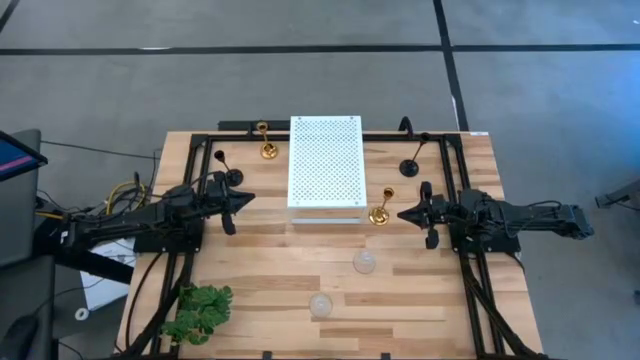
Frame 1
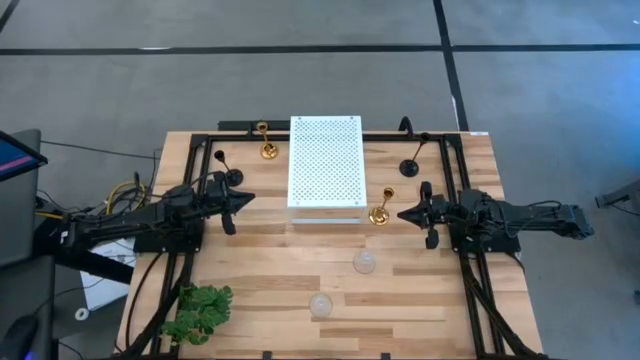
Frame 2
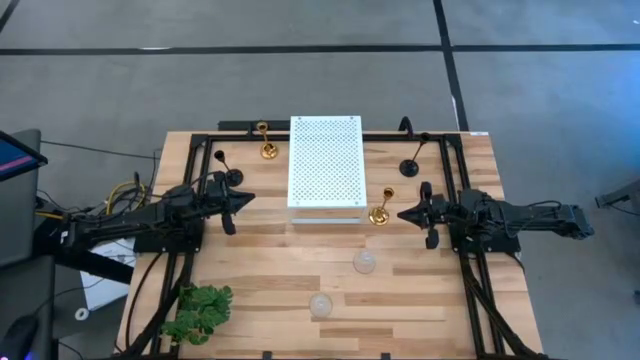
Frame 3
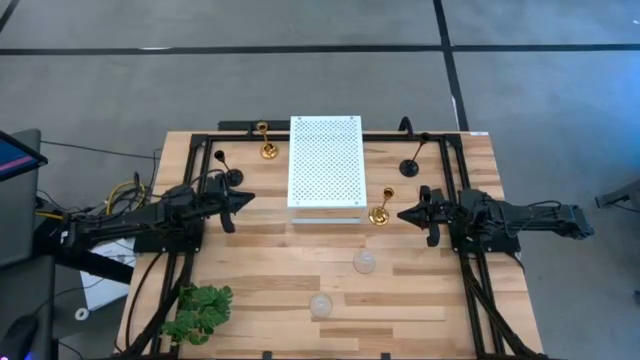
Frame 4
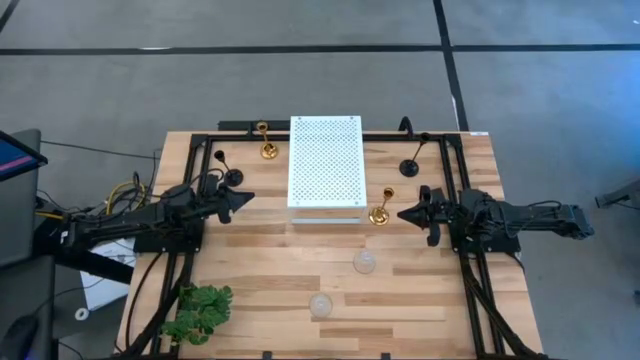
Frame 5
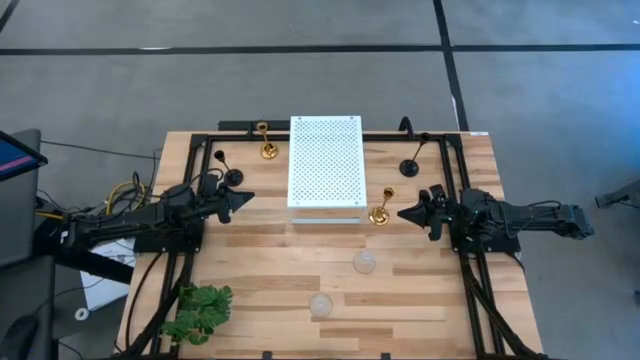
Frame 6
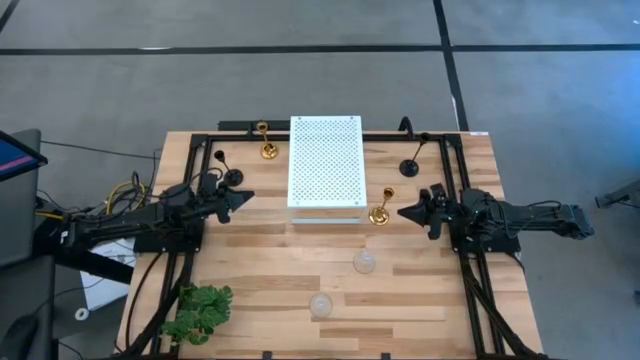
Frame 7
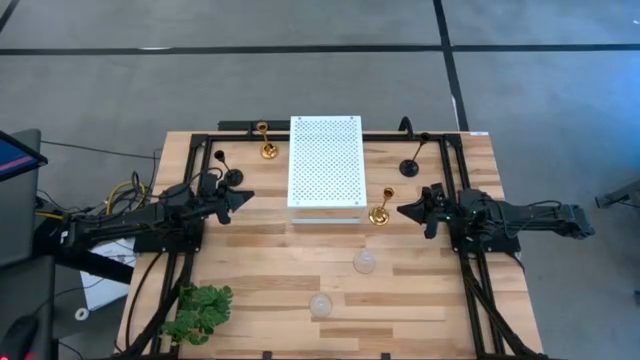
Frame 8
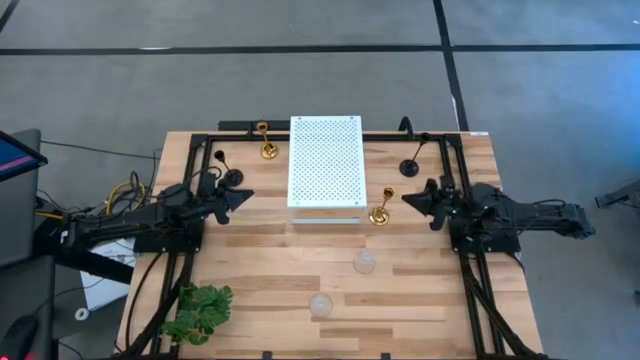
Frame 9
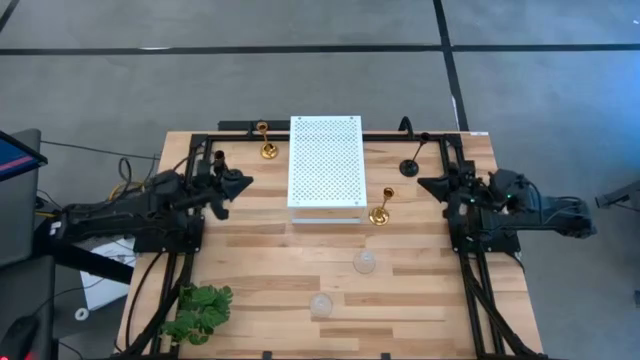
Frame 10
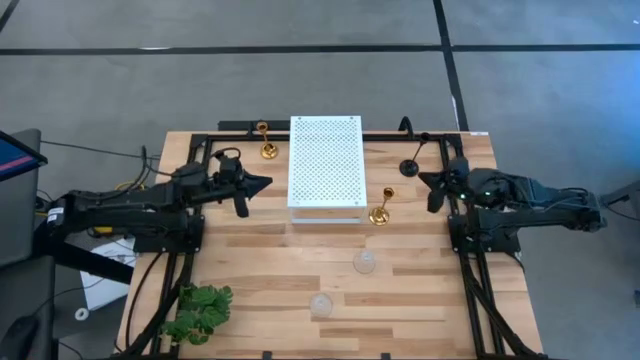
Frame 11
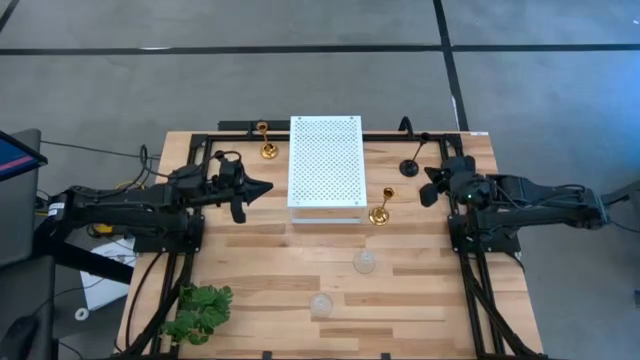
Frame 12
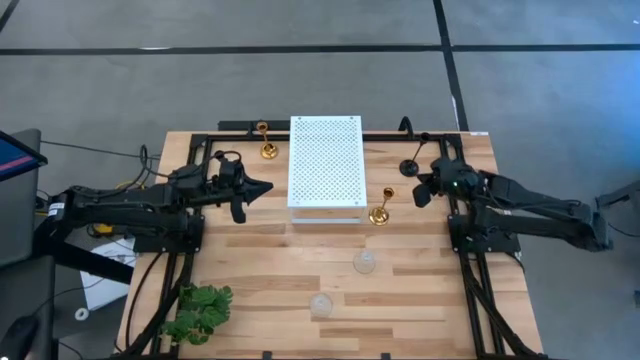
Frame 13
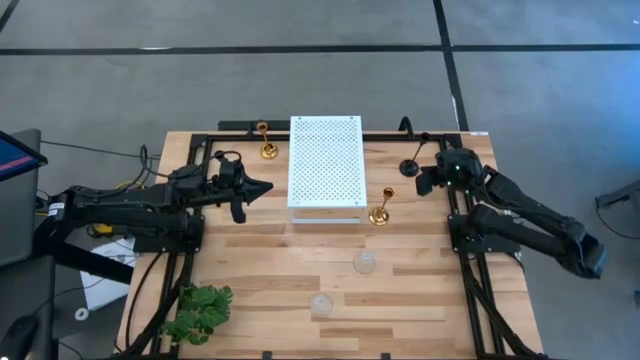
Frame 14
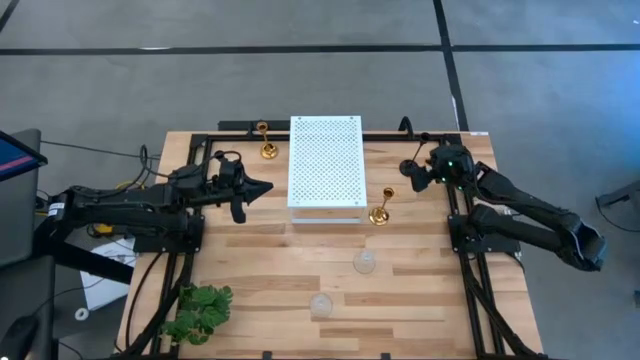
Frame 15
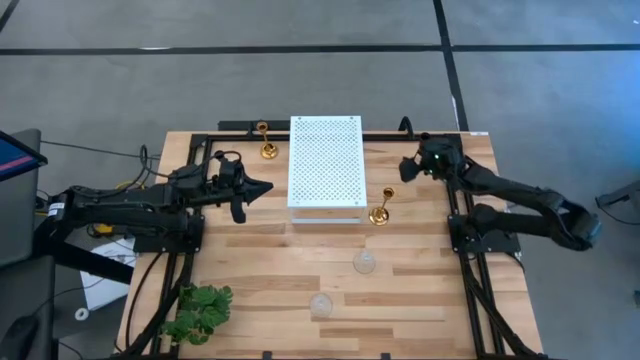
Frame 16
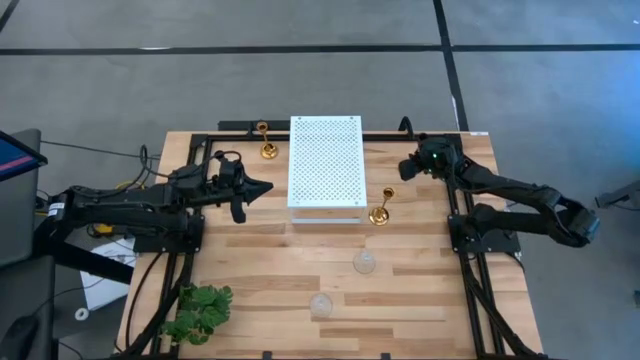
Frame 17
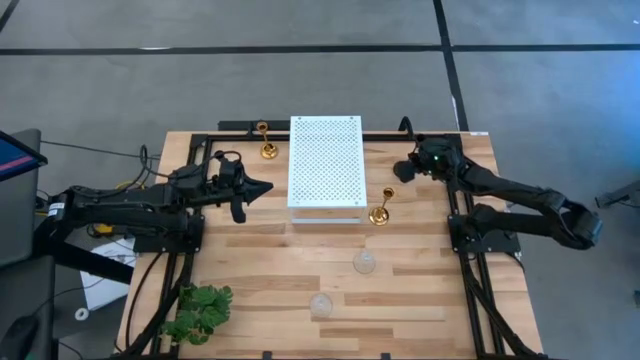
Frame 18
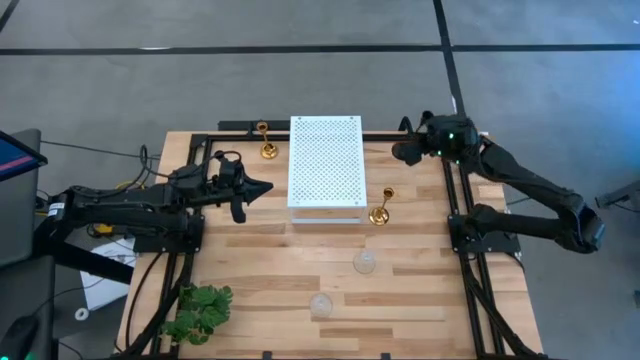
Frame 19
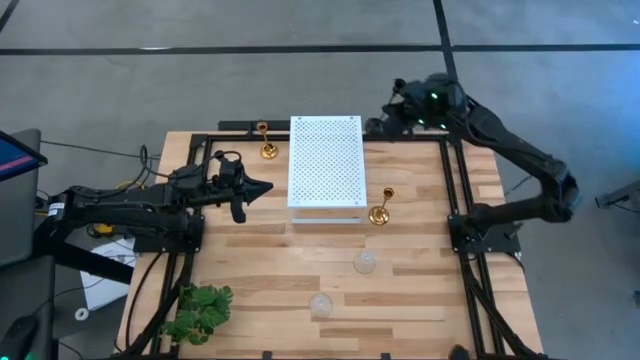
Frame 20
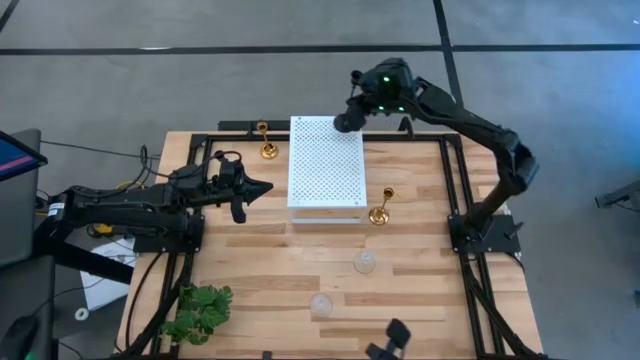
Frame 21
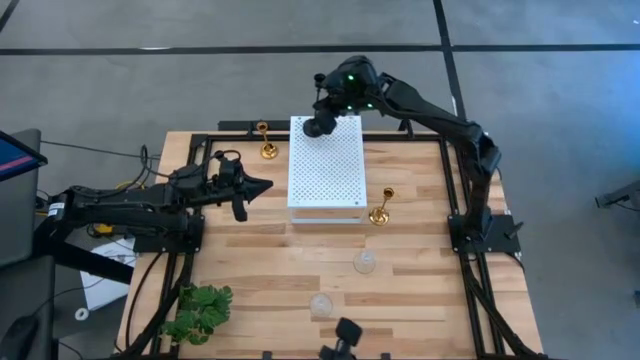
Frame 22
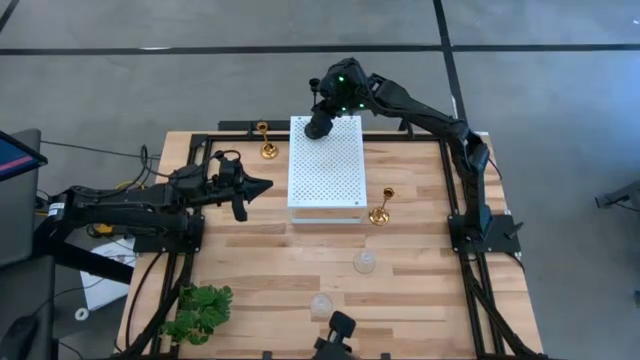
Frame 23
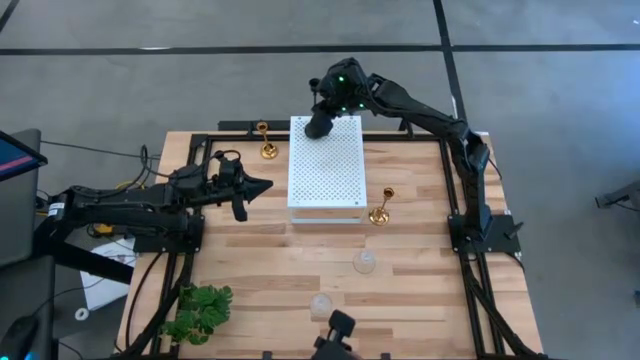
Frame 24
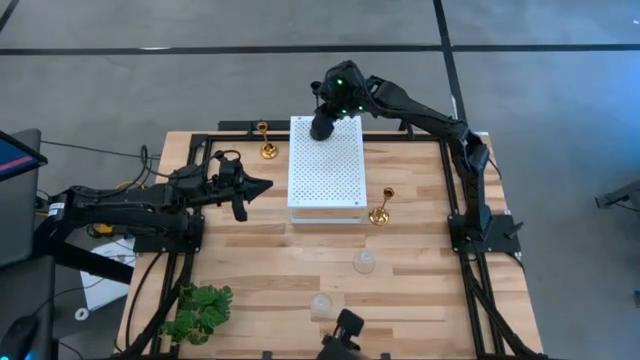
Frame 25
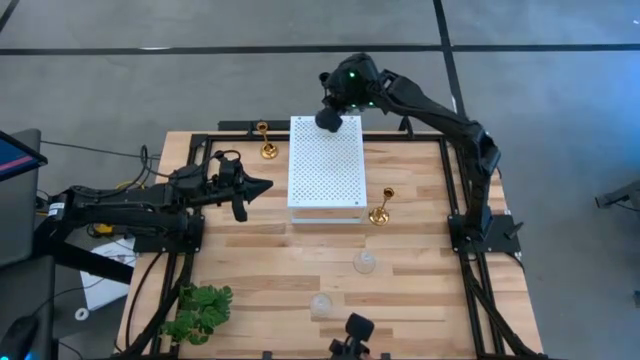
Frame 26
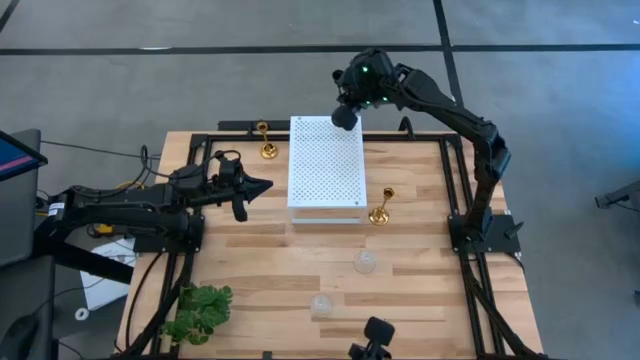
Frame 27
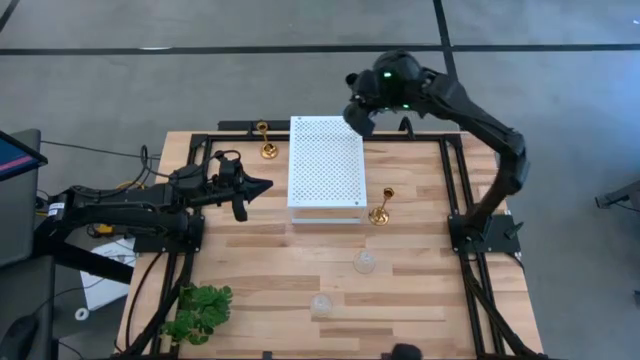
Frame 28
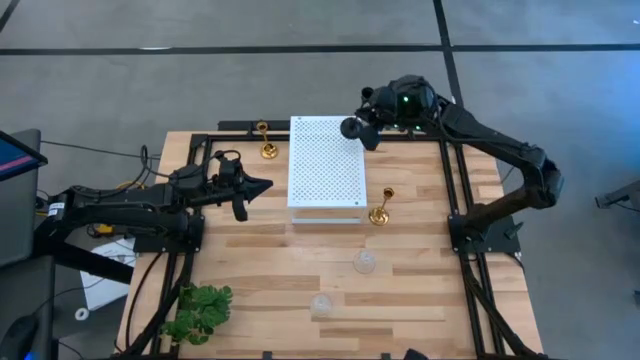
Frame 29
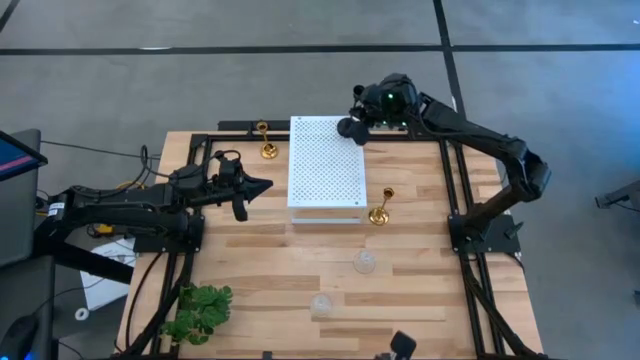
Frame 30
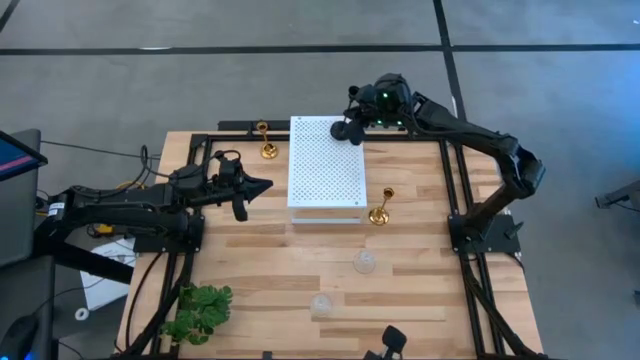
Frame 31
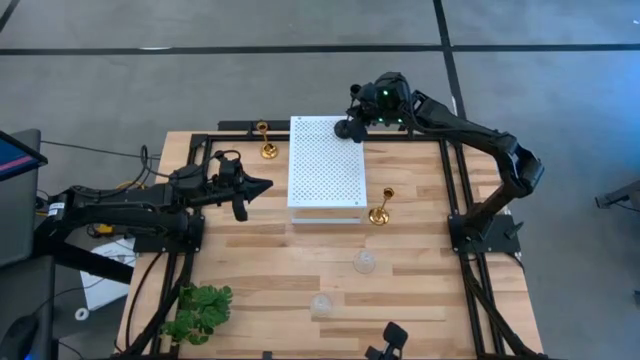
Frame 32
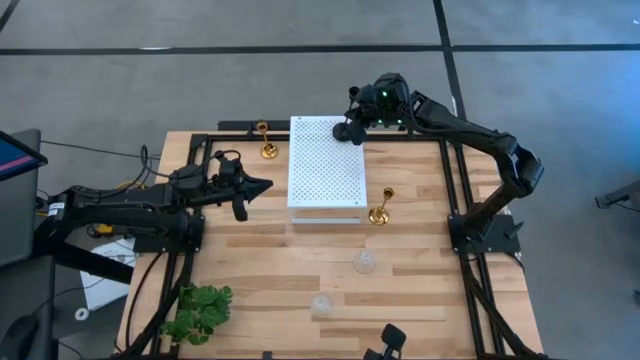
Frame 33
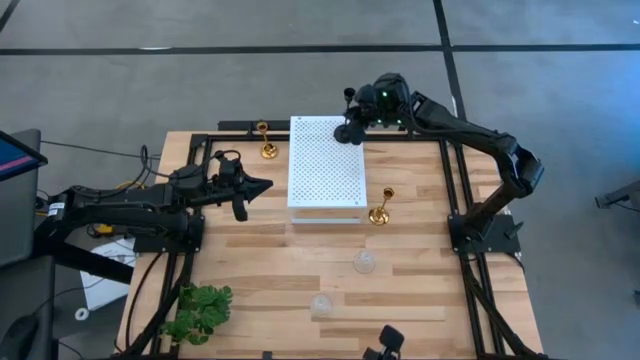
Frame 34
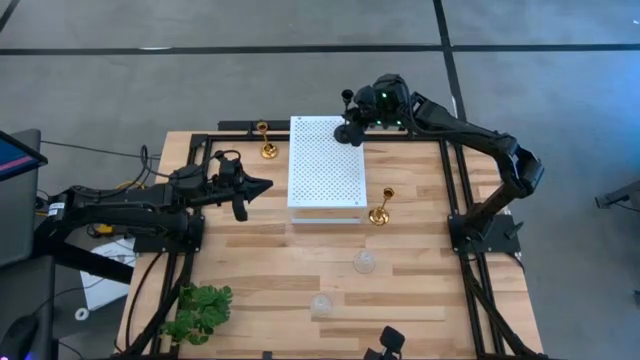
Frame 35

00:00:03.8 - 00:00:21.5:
Task: Pick & Place candle stick holders
Put the right black candle holder on the shelf

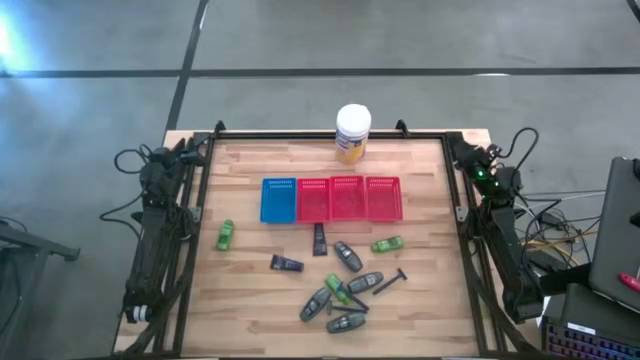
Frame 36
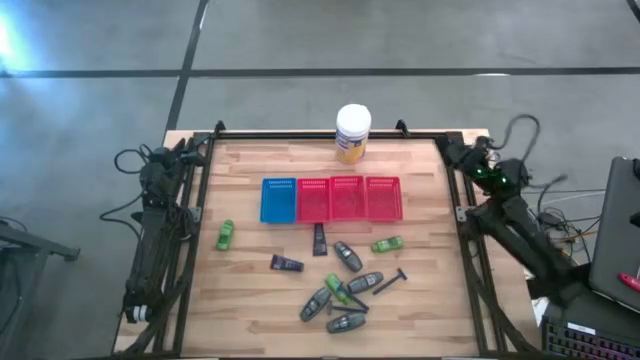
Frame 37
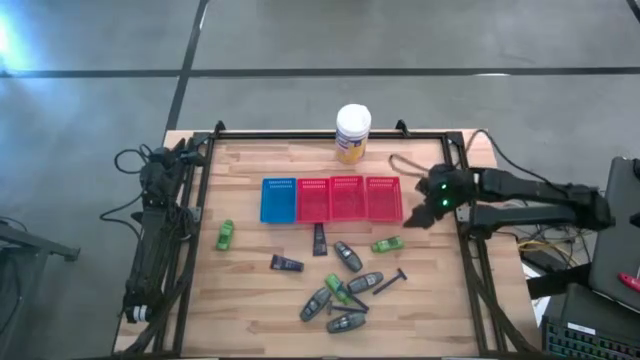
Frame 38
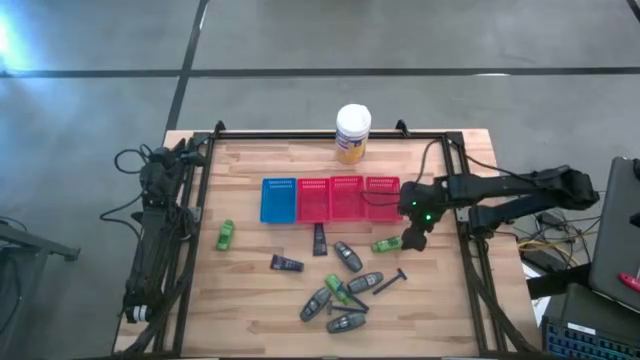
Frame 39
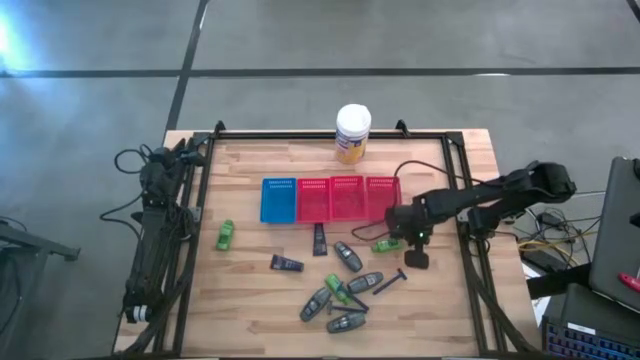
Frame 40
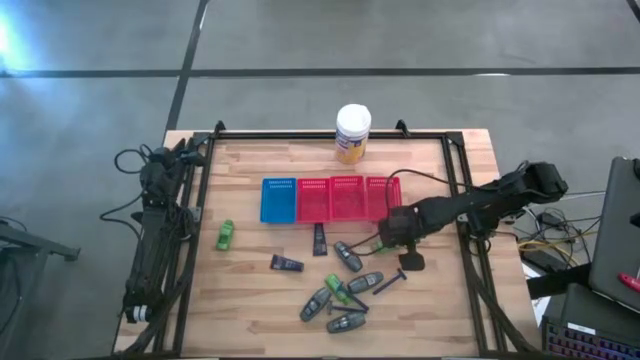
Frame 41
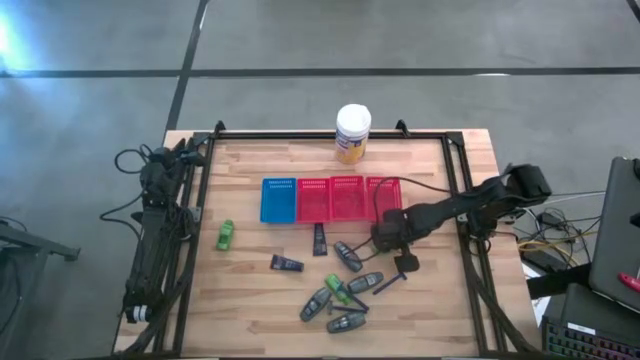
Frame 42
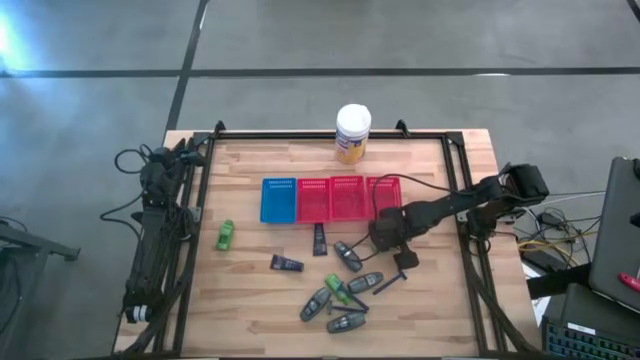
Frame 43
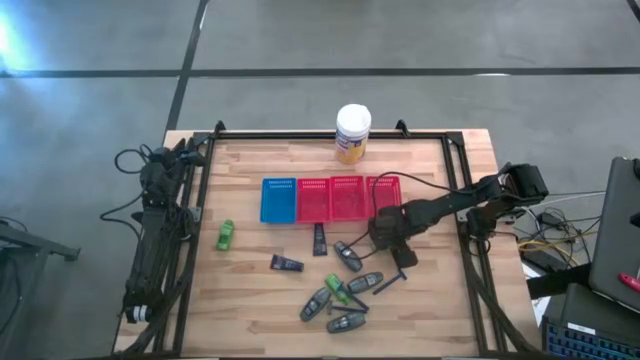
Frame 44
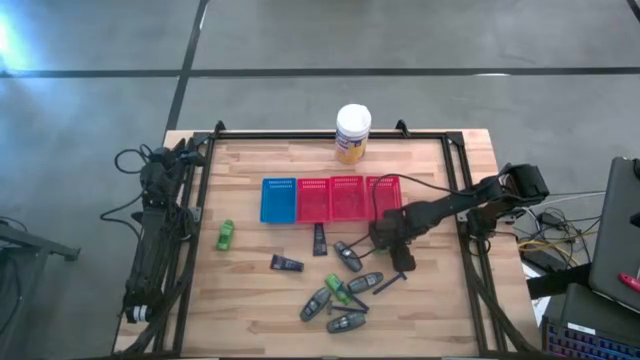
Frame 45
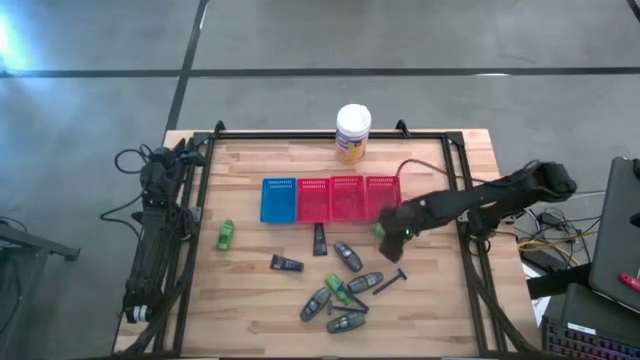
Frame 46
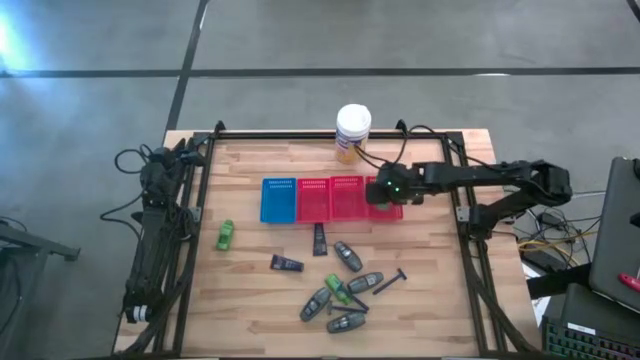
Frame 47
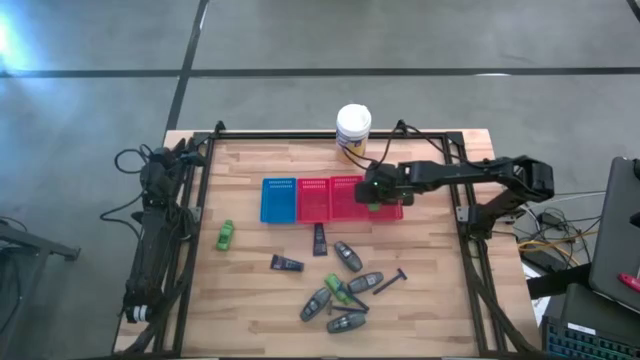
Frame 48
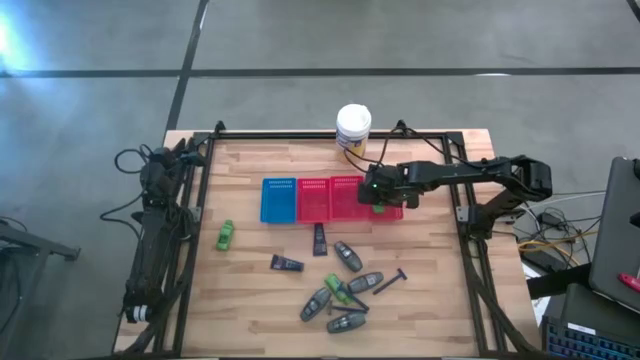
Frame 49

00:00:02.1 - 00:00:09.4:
Task: Pick & Place Travel size toiletries
Put the green shampoo into the right red bin
